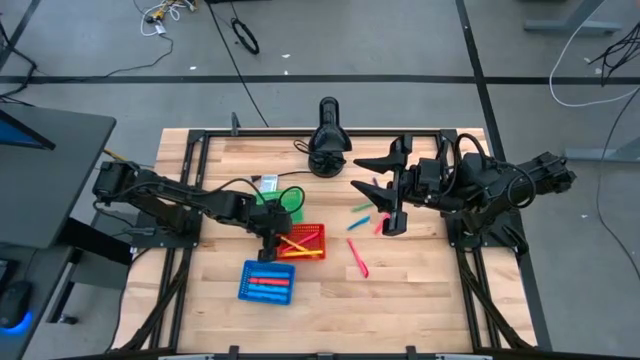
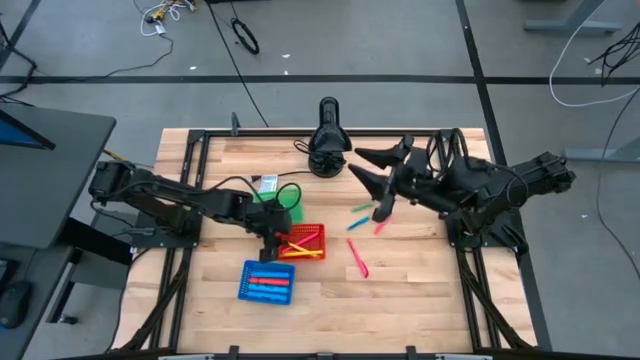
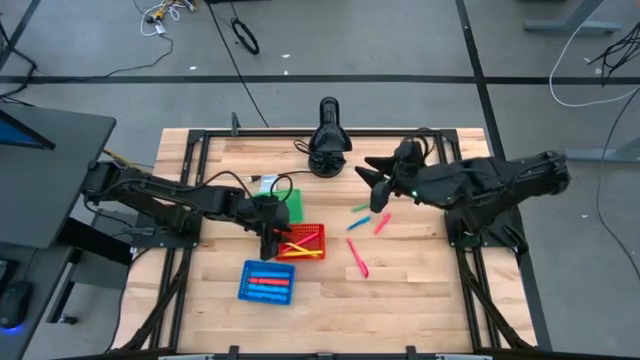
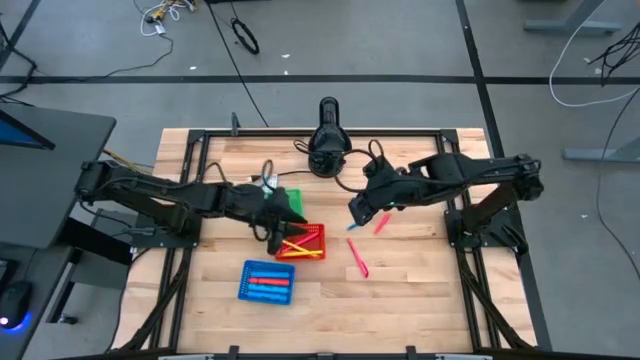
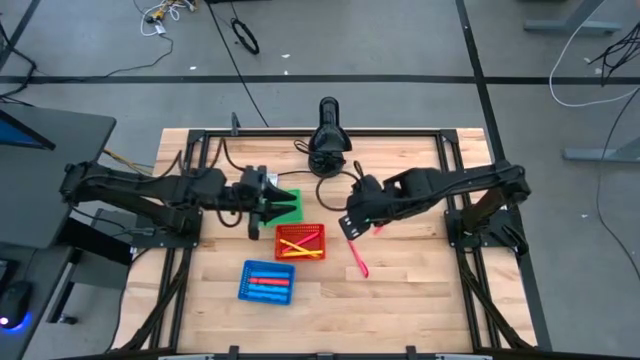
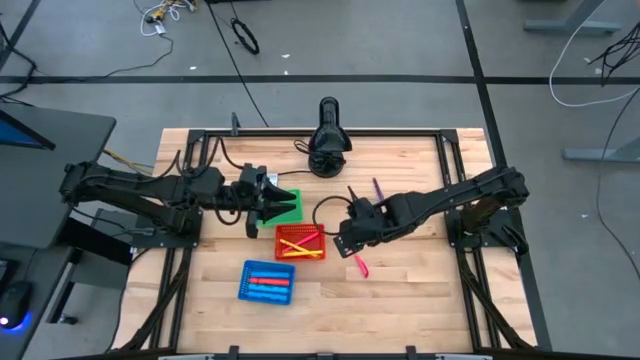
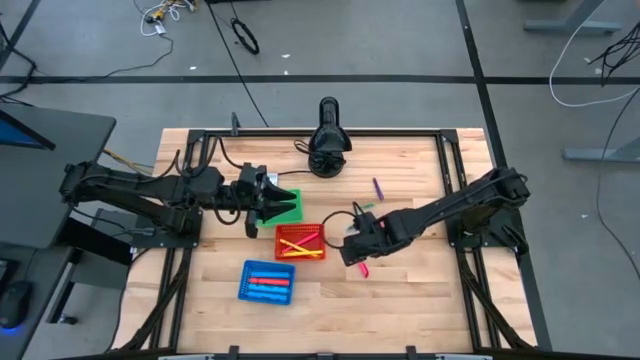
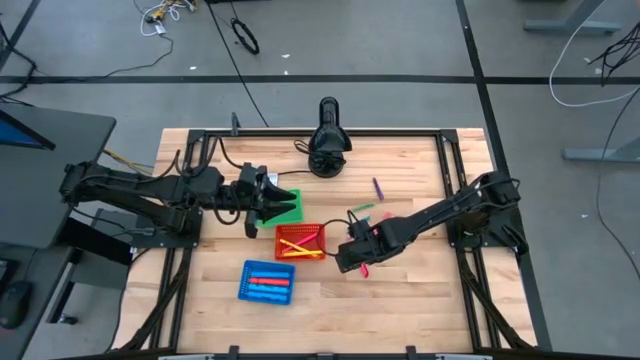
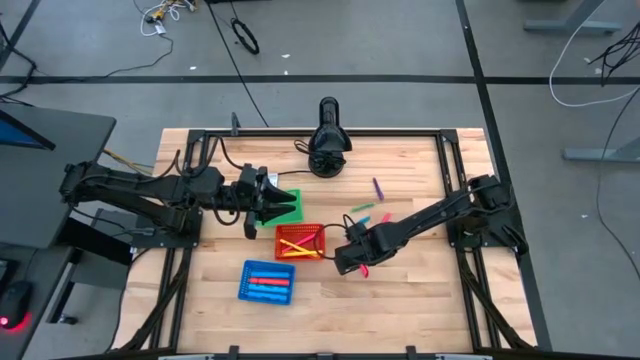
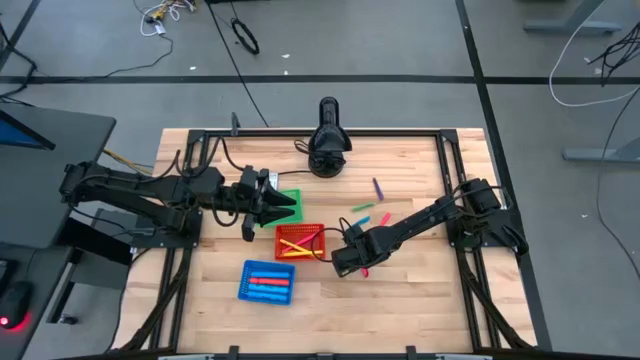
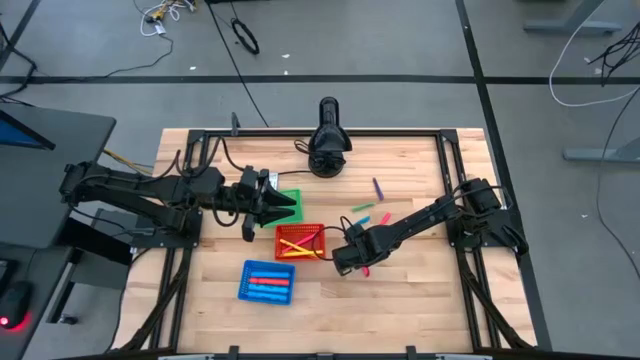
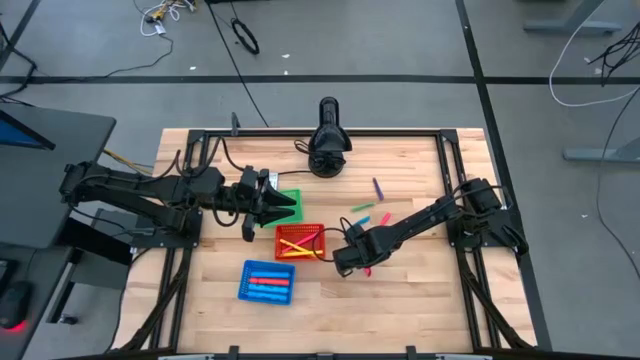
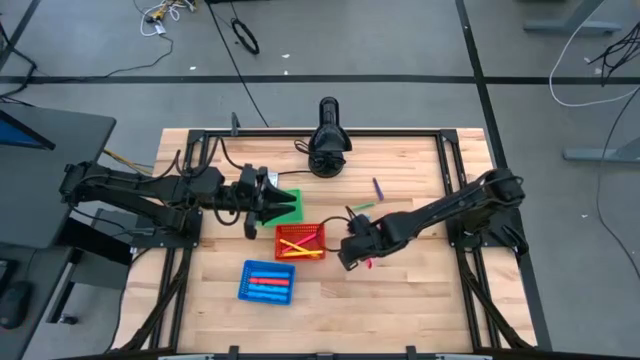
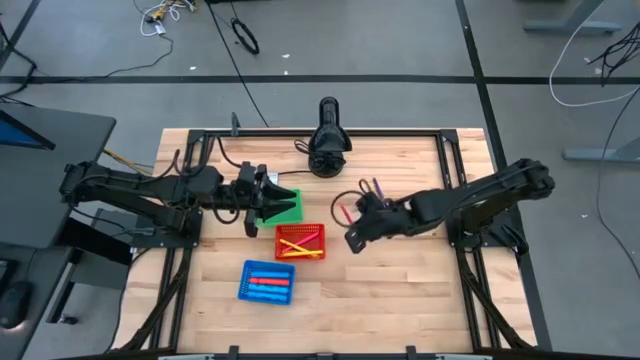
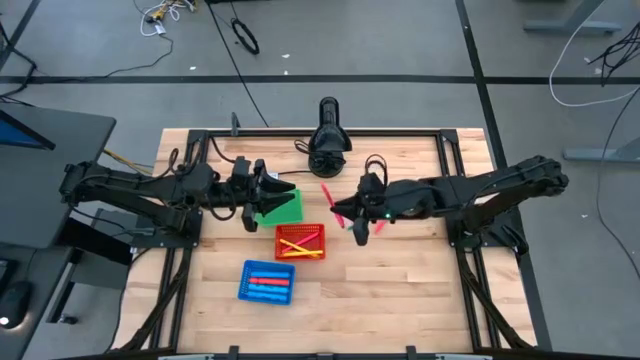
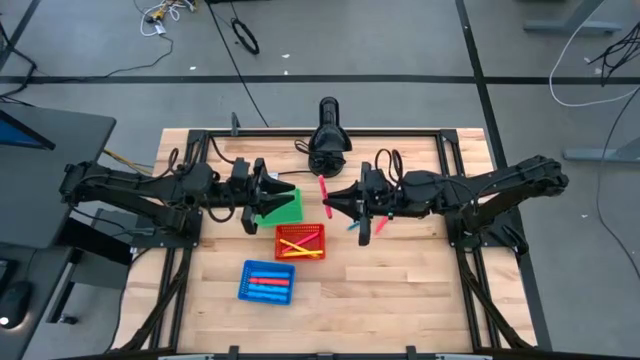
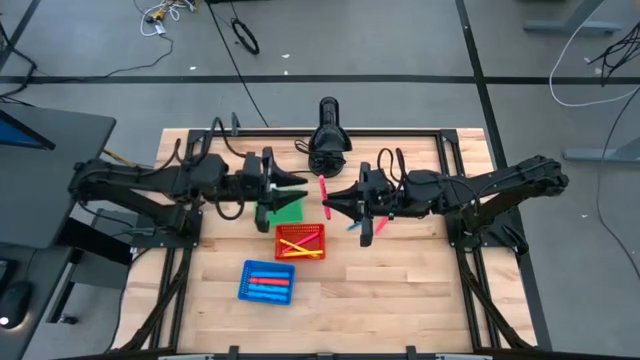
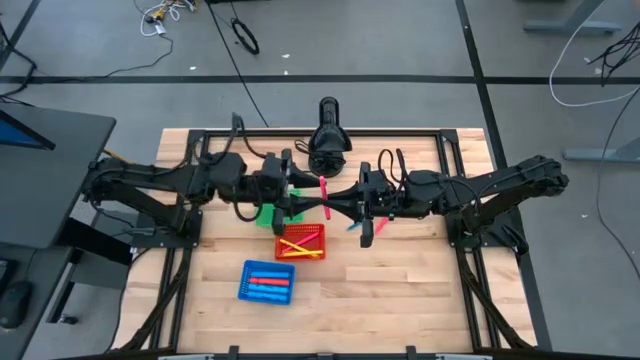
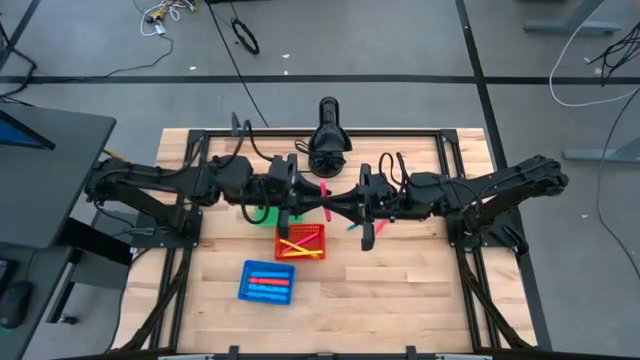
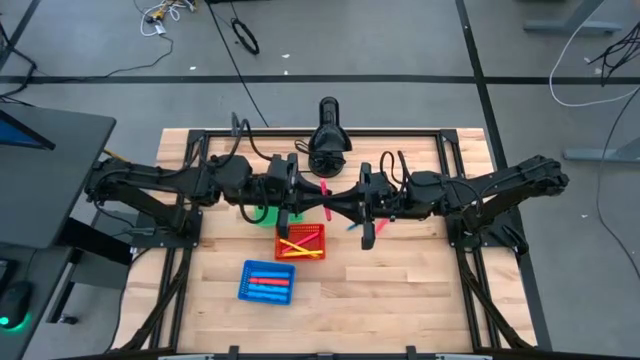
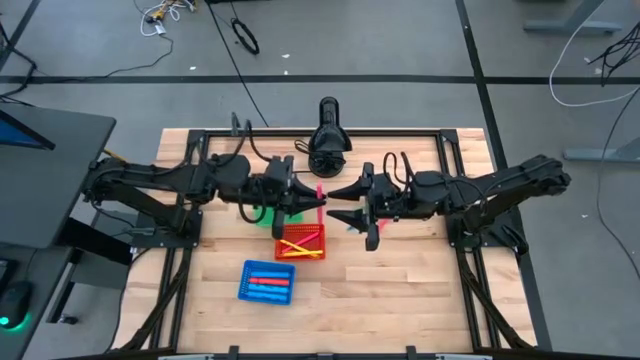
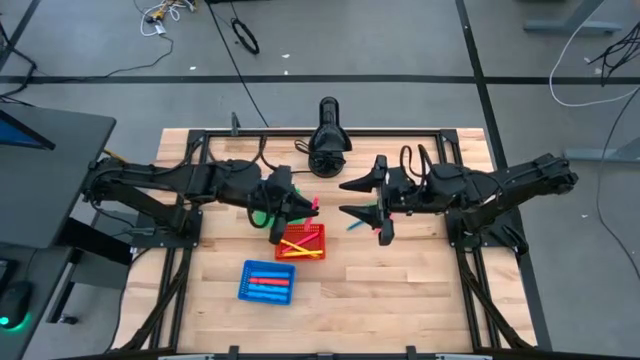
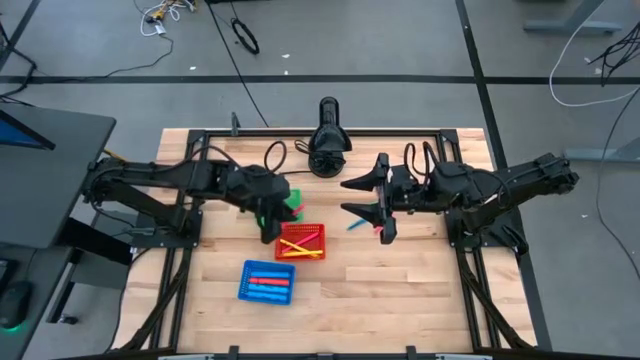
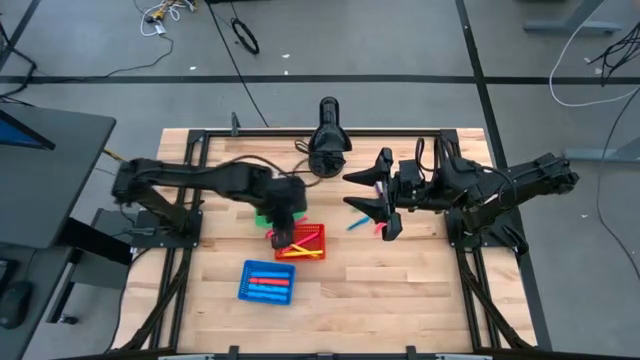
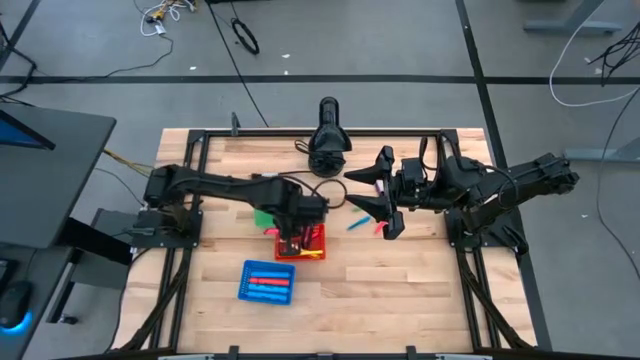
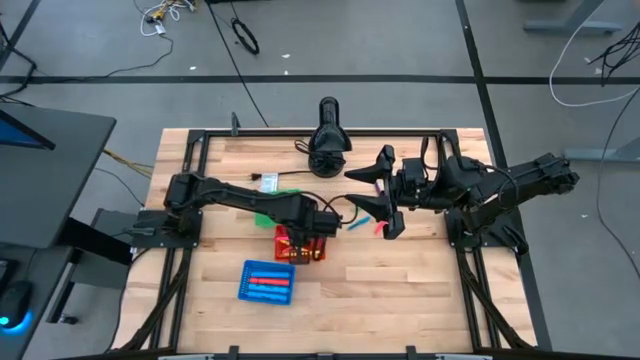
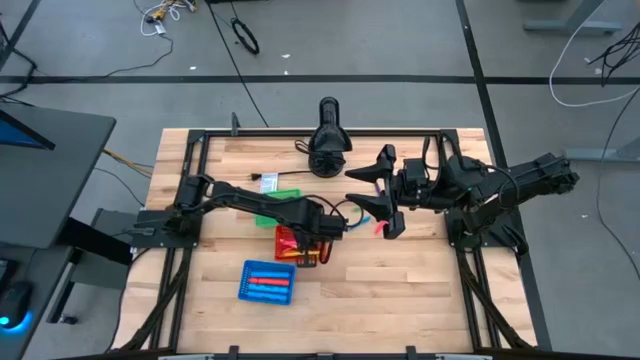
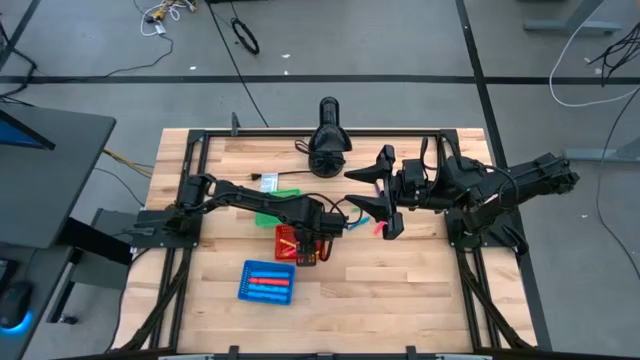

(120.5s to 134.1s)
Task: Pick & Place Markers
Put the pink marker pen into the red bin

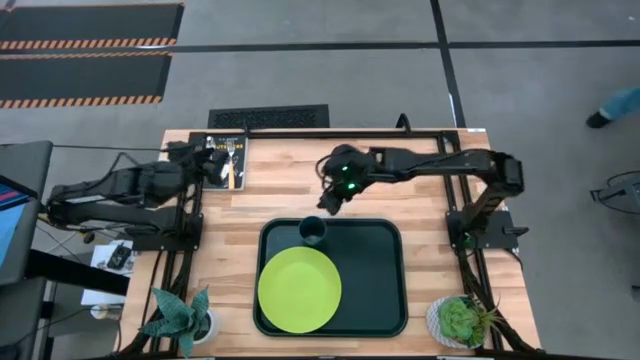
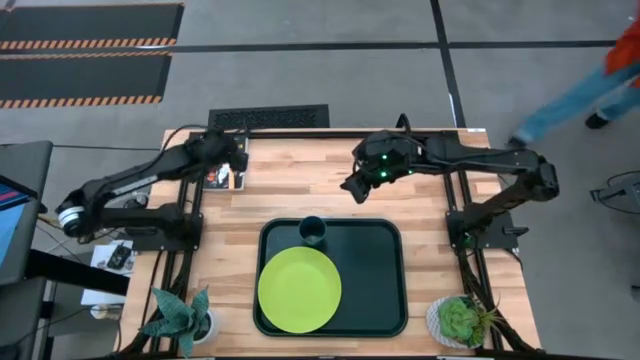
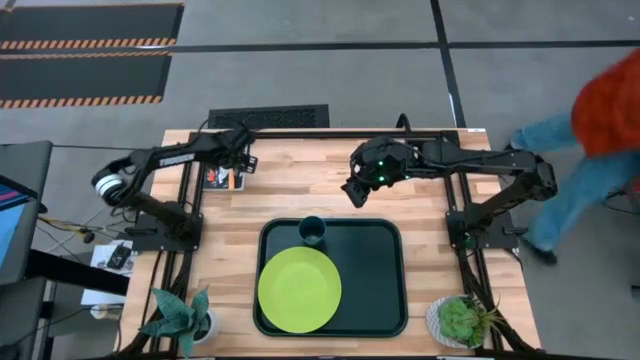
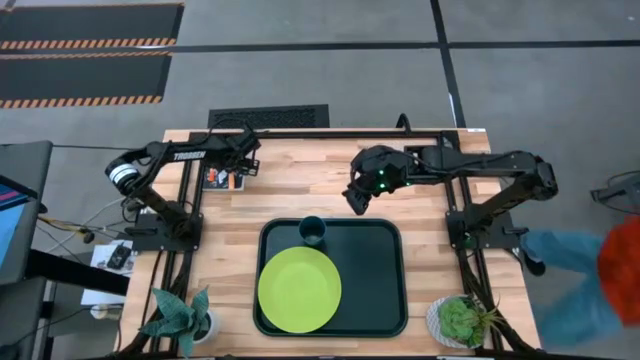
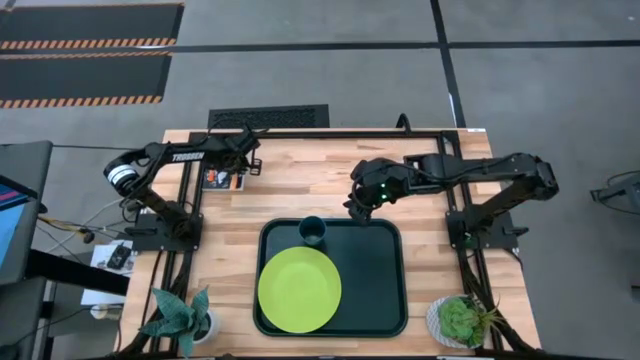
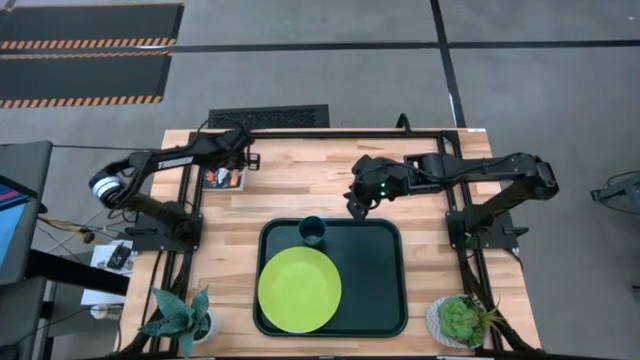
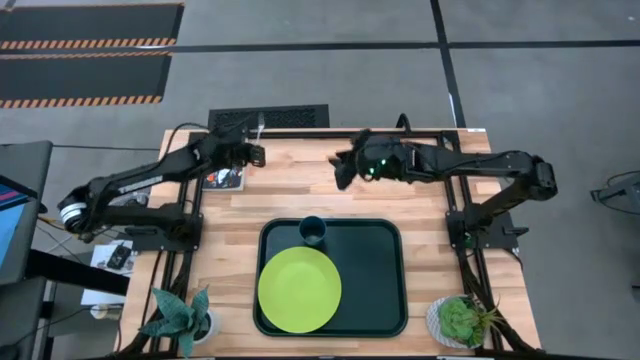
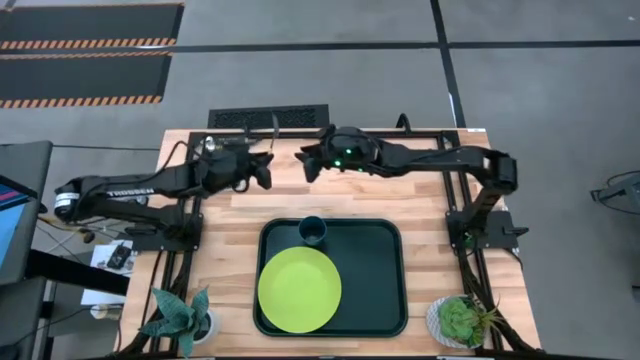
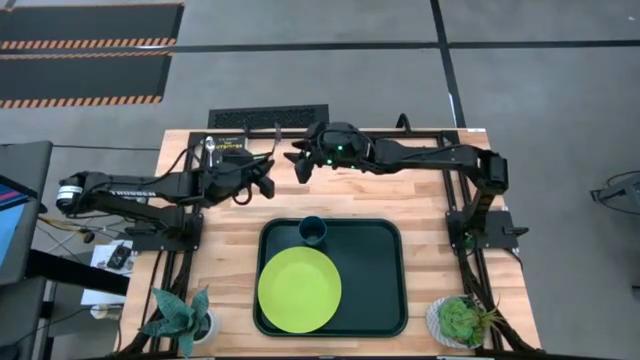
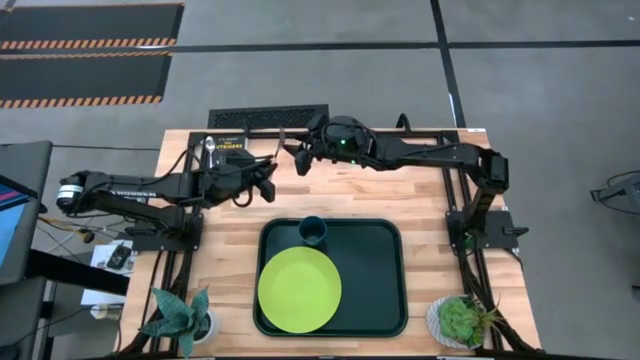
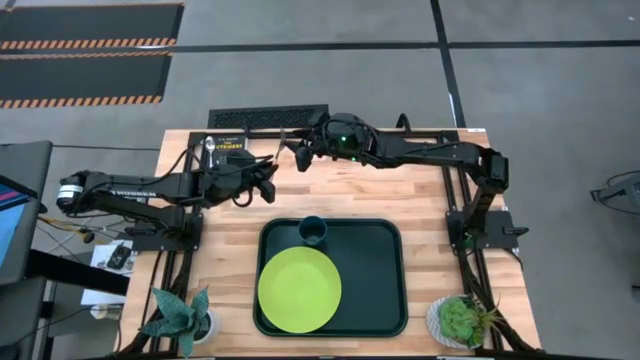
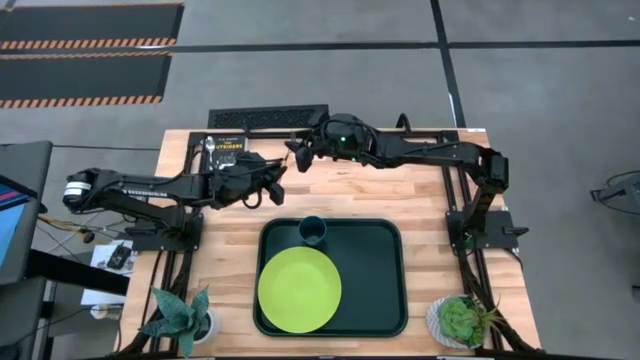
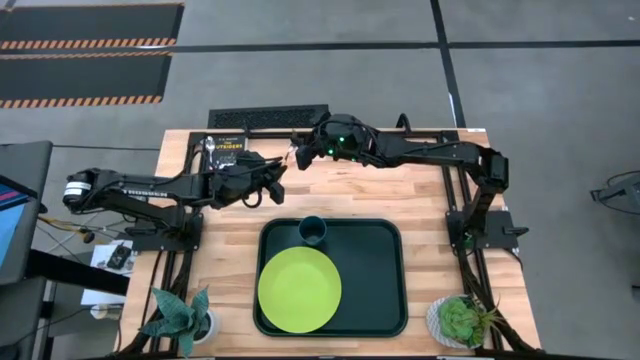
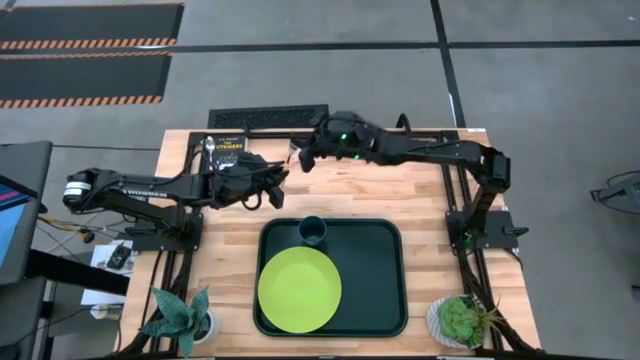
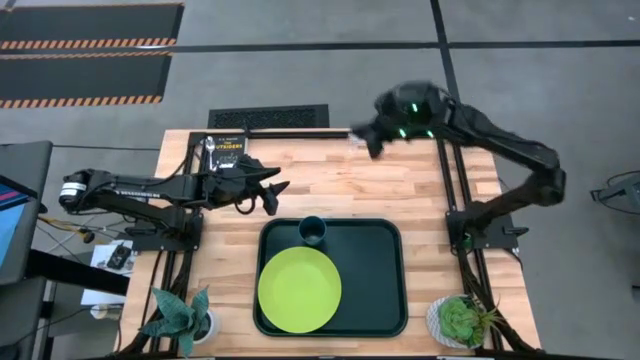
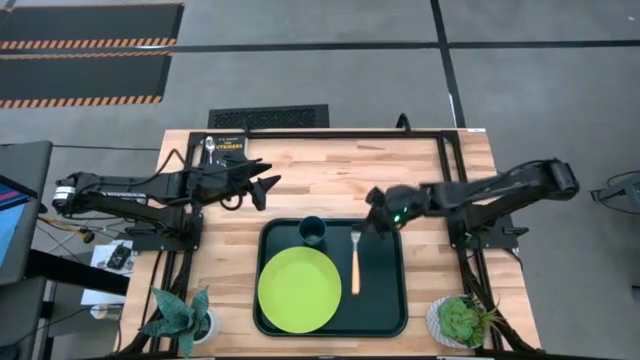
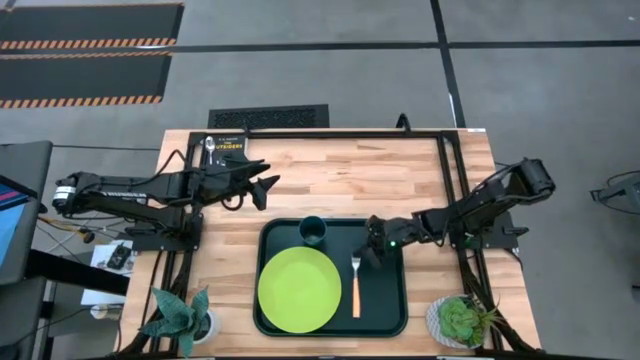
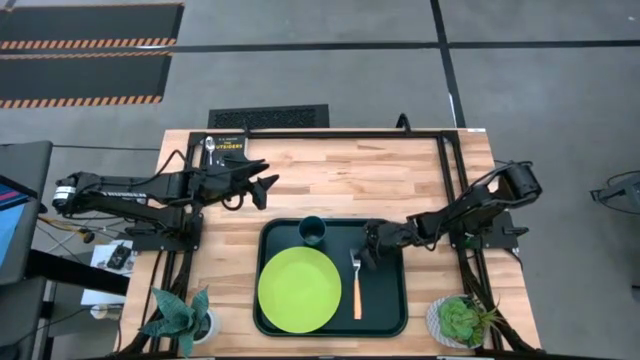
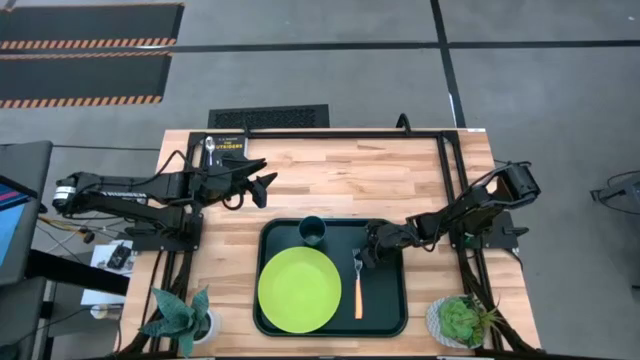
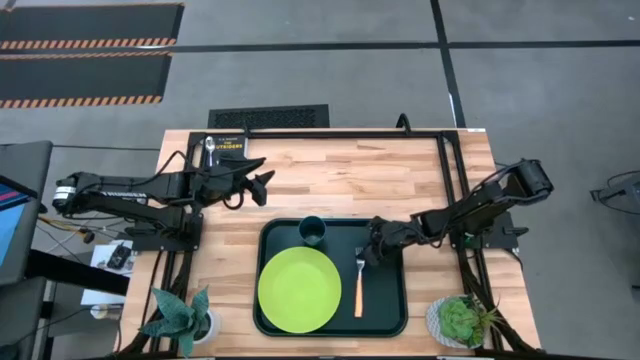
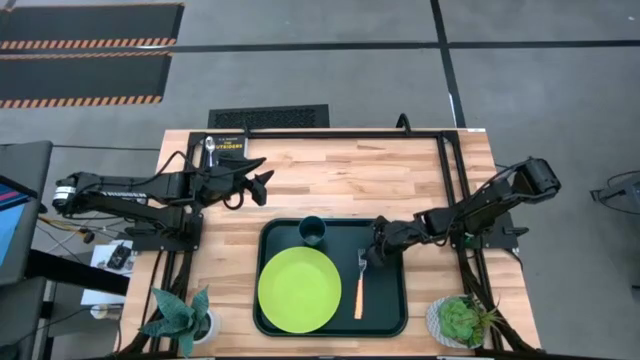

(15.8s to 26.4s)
Task: Pick and place plate/cup/fork/spoon on tray
Put the orange fork to the right of the green plate on the green serving tray
